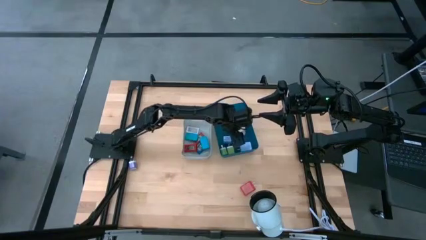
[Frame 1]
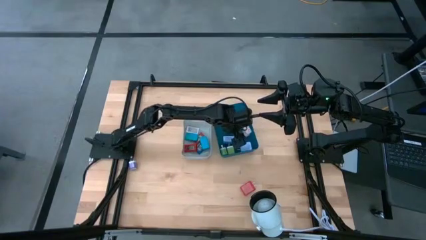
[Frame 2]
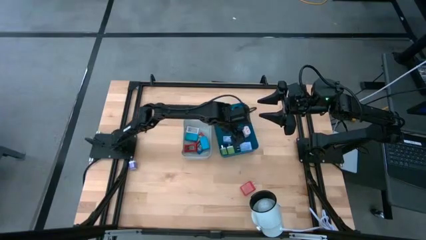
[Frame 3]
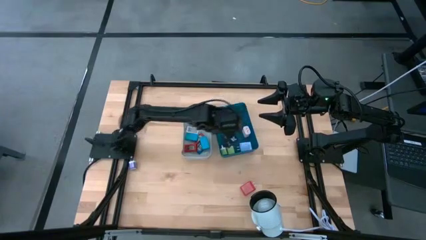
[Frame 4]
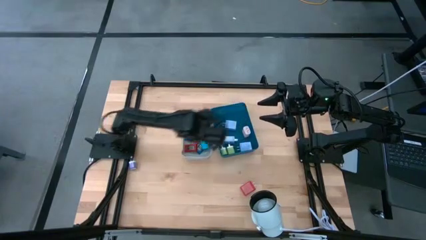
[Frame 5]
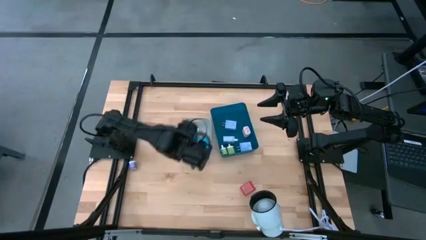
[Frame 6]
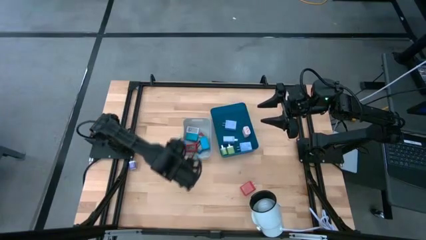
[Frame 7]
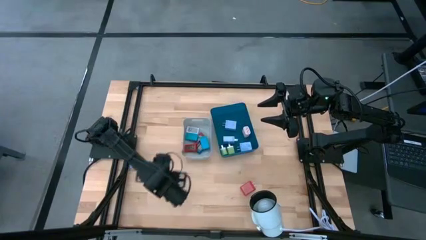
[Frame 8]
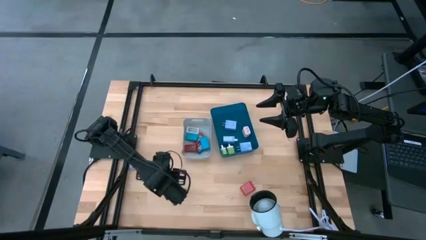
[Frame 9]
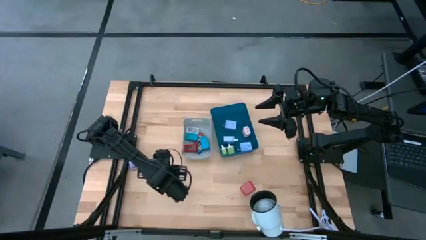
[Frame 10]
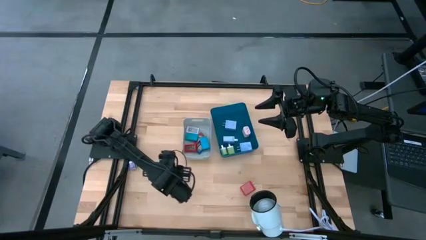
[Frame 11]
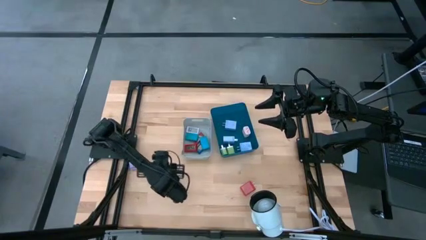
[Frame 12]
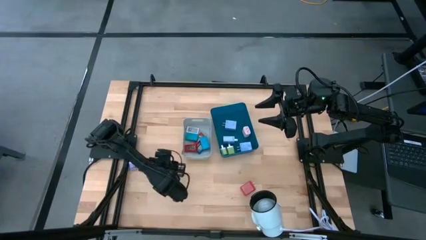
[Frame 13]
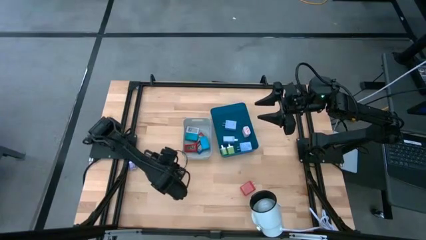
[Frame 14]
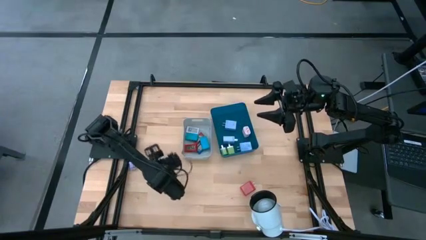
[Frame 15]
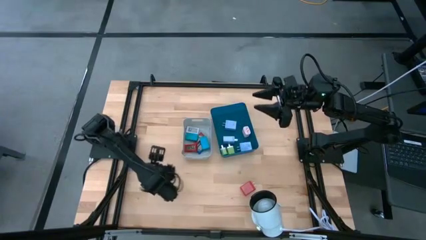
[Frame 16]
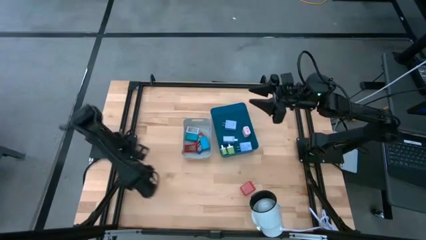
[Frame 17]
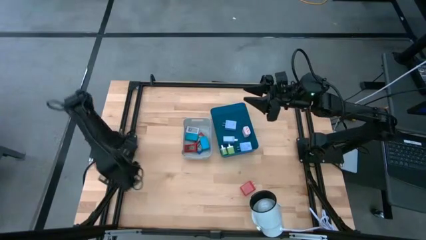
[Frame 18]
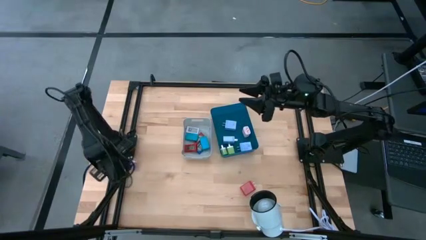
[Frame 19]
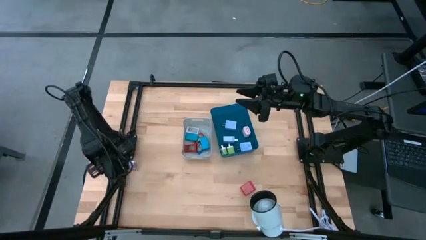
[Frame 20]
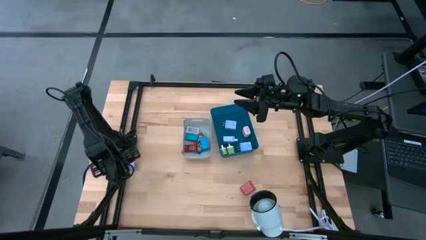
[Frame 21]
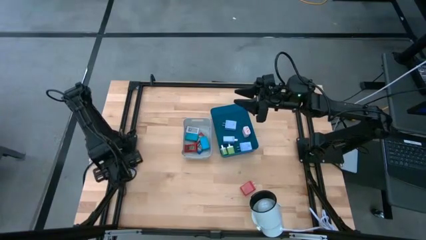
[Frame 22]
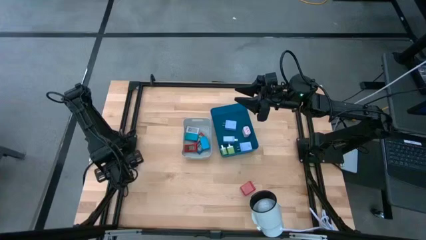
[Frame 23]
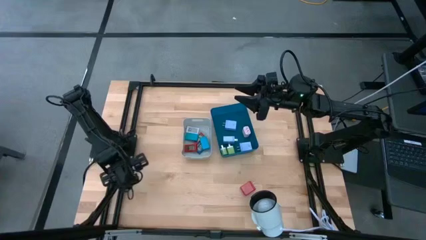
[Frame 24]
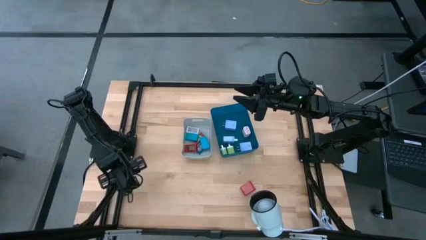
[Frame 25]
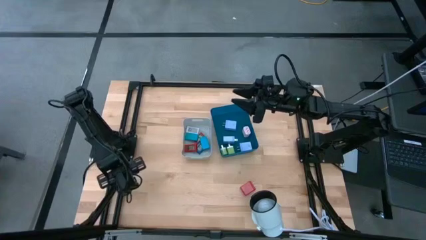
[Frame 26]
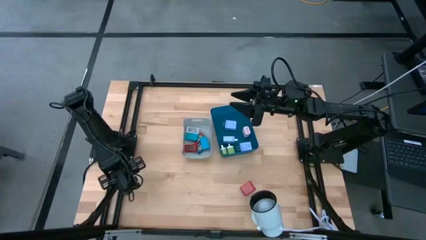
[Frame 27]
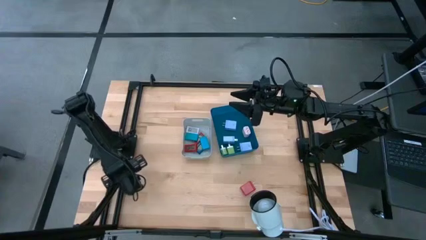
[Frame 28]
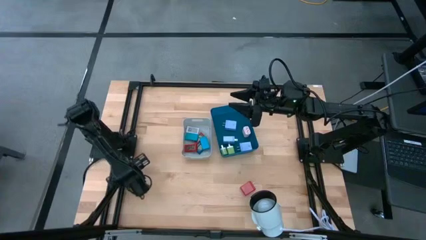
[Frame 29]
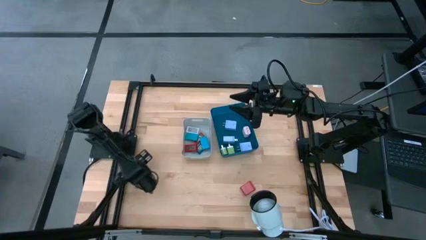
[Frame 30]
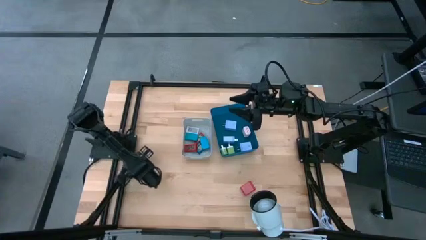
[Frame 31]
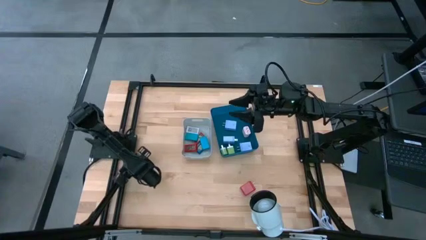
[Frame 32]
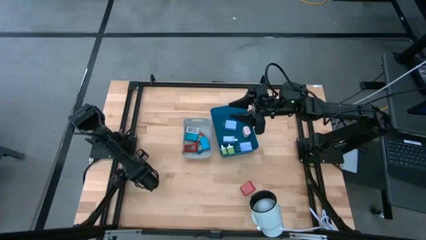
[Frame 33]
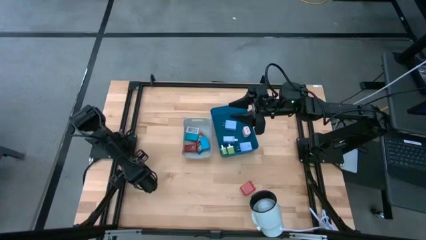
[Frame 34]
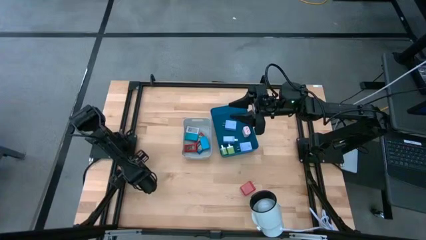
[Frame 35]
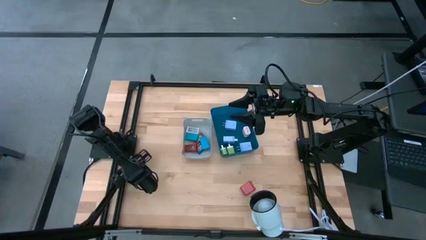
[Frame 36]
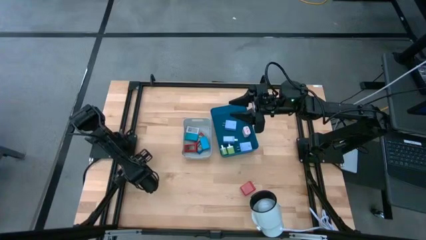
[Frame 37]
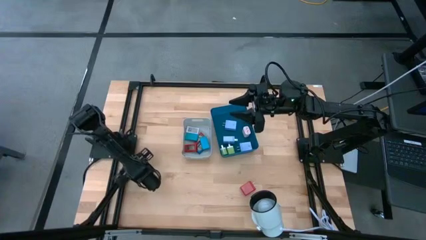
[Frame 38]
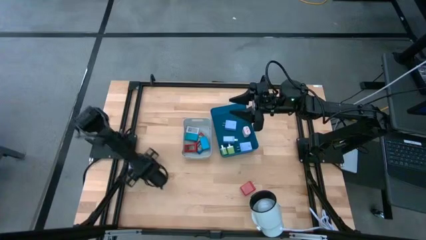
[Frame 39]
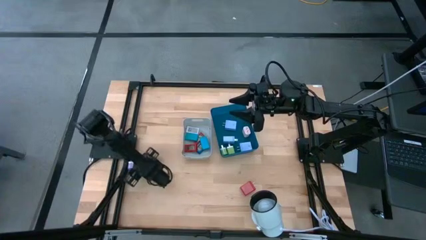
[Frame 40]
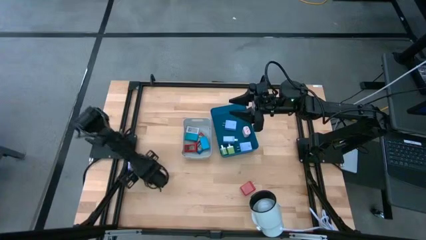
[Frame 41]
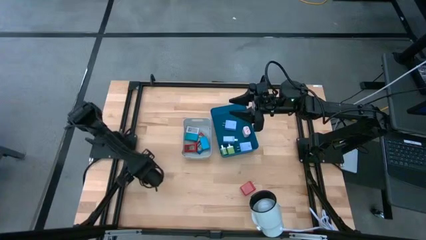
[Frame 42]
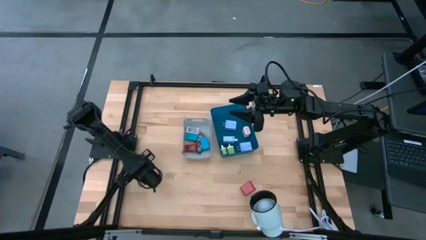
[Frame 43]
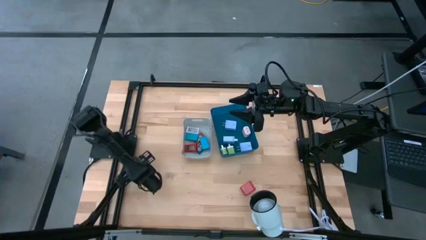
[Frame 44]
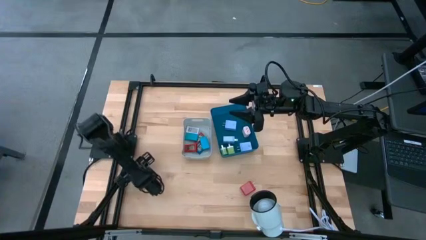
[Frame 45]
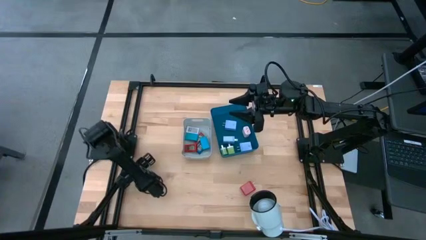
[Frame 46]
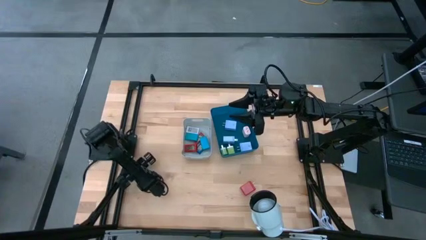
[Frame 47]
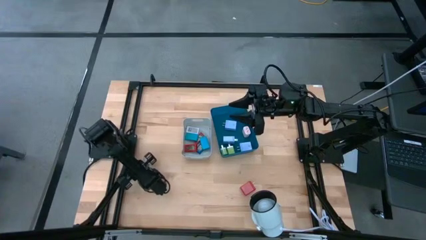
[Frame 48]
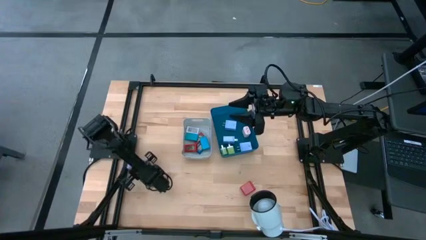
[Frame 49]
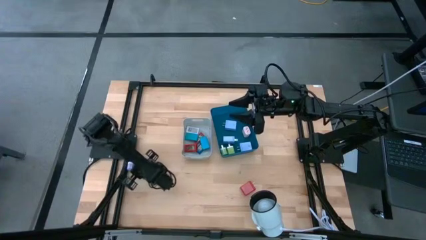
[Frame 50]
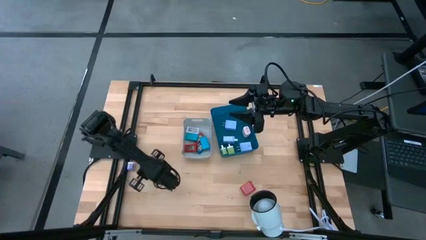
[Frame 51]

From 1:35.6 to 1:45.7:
Task: Pick & Place Office items
Put the violet charger adapter into the blue bin

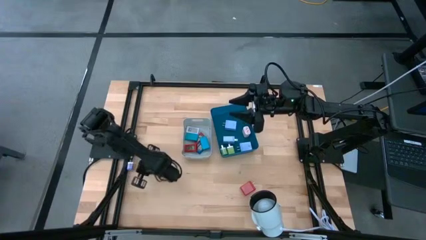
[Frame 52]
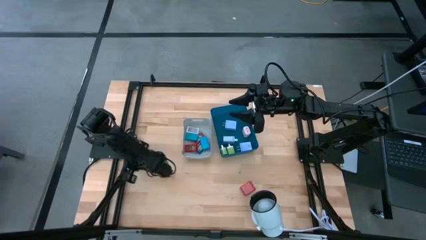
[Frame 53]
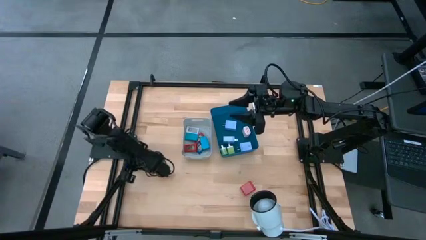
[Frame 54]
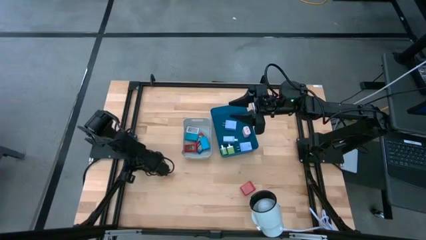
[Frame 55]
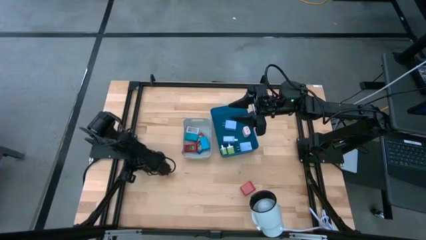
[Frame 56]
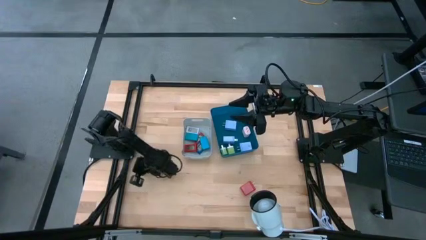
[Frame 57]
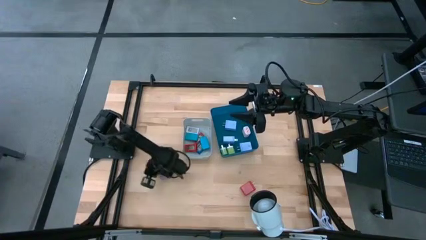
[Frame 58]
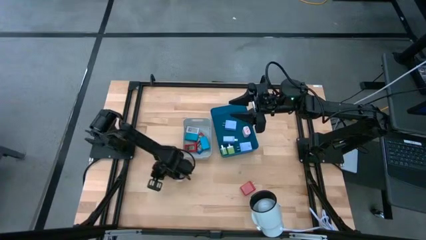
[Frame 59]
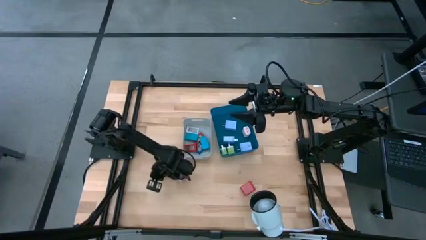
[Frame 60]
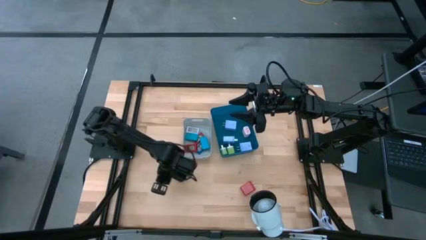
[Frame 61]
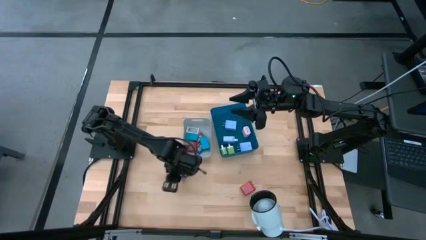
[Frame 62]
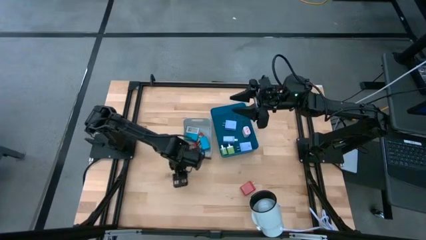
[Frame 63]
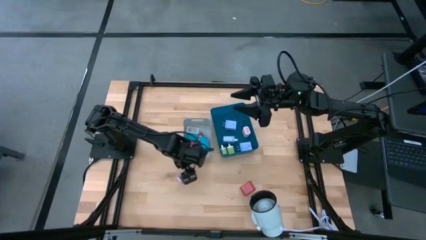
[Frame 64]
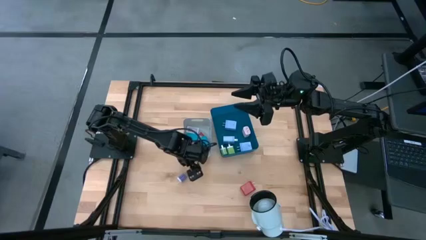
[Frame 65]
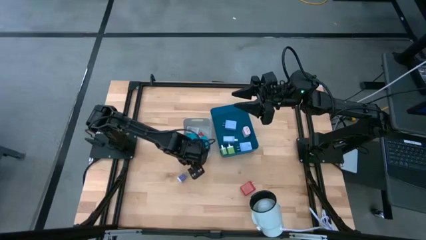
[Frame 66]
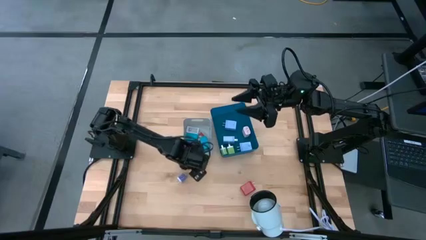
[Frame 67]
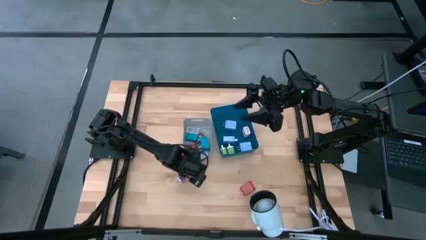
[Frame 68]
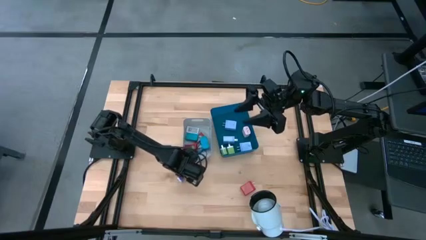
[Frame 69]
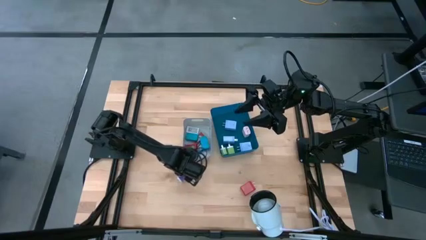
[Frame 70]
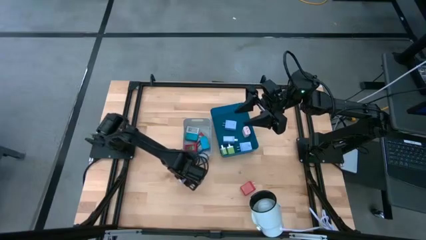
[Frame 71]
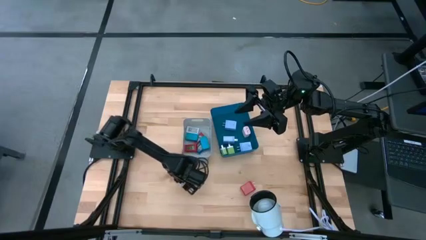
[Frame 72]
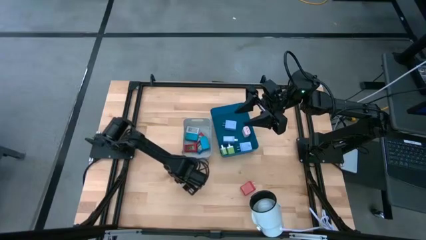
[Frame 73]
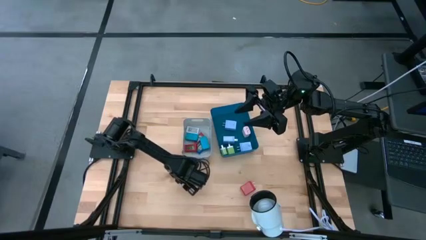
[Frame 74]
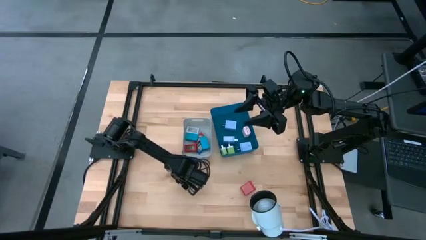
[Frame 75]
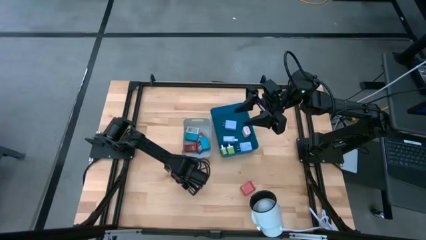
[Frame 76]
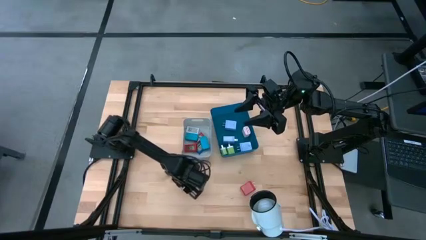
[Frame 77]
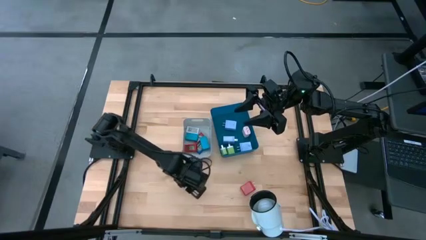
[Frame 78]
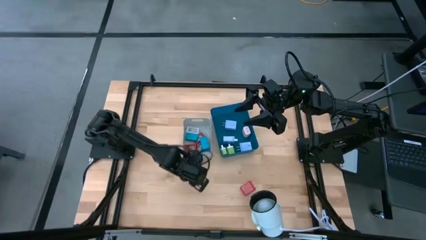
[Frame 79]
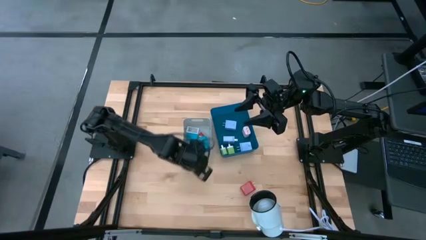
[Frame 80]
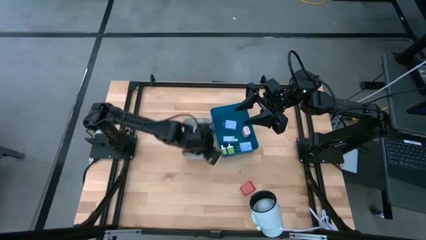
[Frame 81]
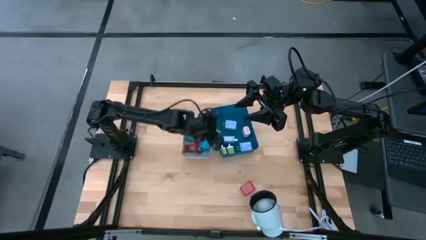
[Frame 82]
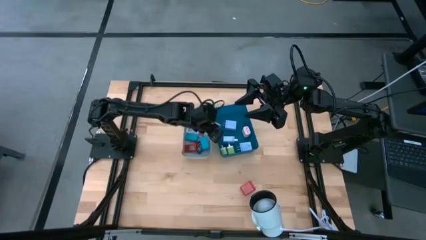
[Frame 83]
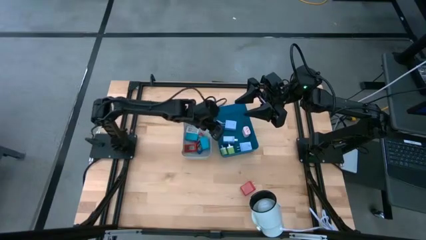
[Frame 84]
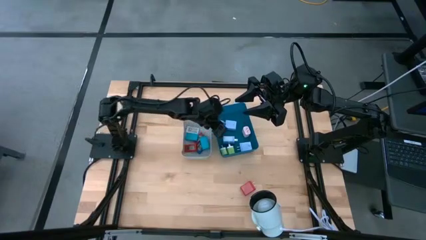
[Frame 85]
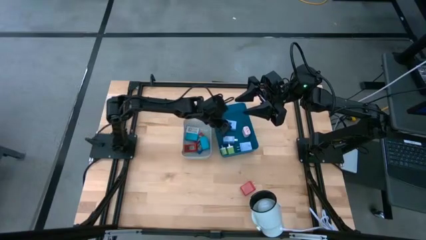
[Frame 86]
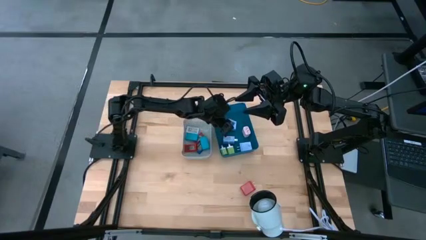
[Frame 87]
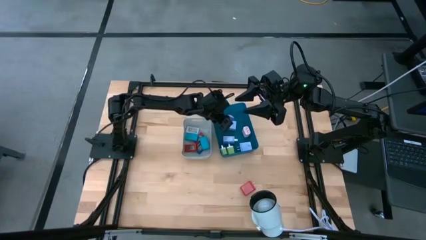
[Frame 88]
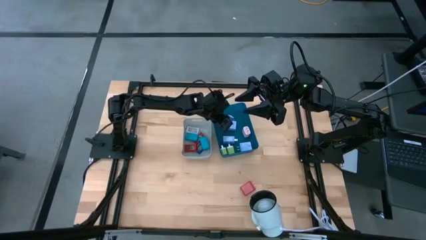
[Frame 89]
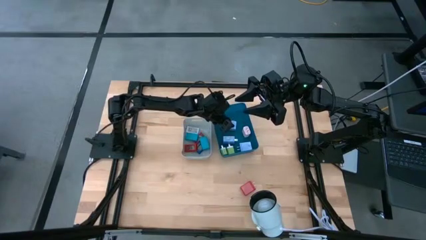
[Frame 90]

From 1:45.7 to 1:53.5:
Put the violet charger adapter into the blue bin
